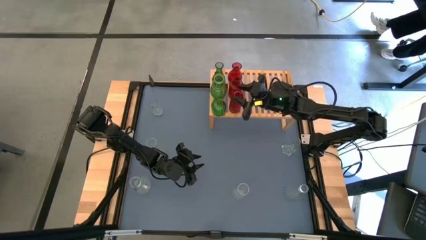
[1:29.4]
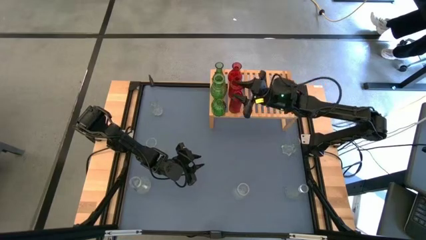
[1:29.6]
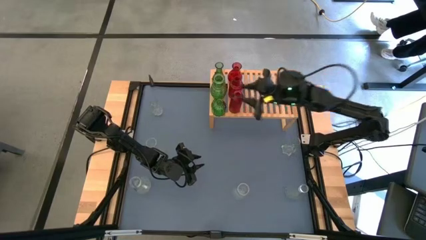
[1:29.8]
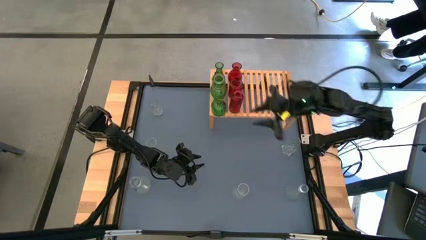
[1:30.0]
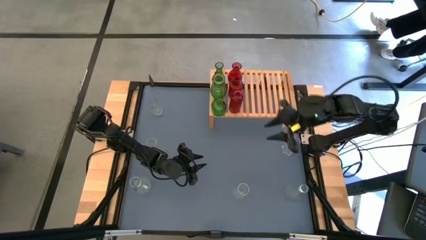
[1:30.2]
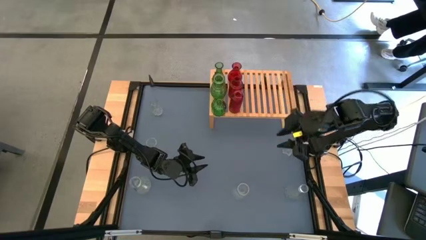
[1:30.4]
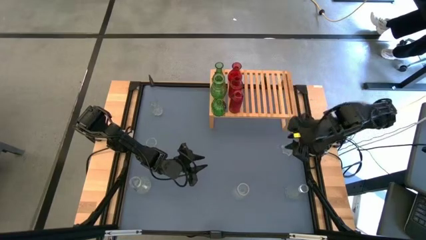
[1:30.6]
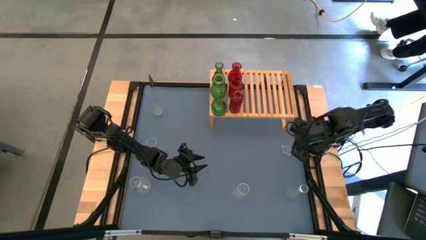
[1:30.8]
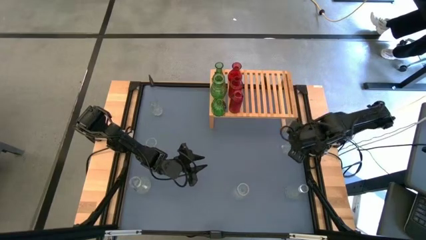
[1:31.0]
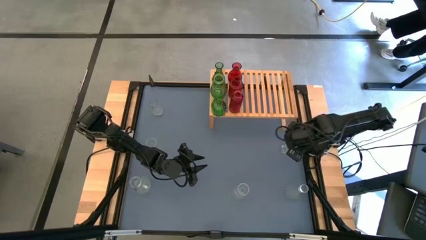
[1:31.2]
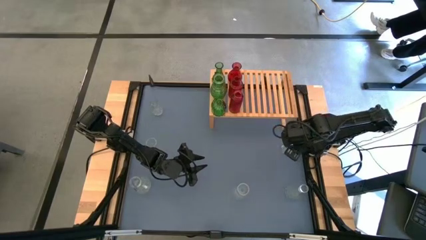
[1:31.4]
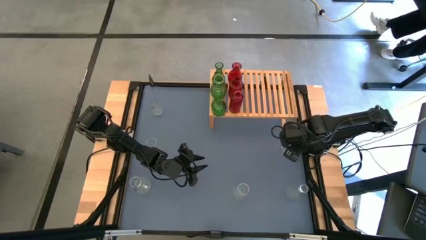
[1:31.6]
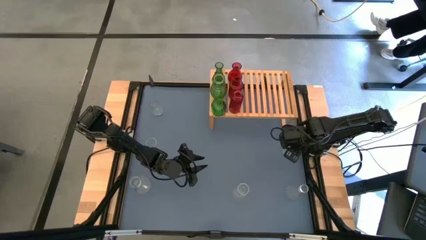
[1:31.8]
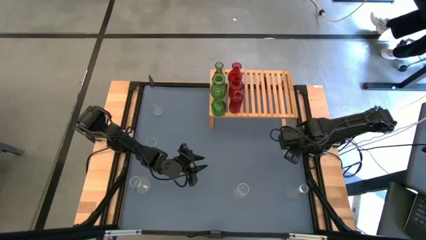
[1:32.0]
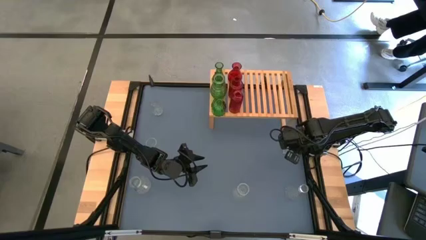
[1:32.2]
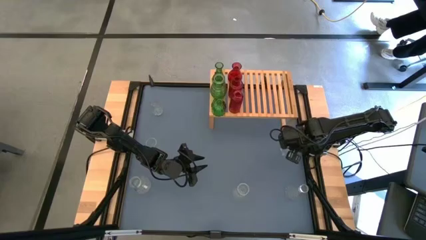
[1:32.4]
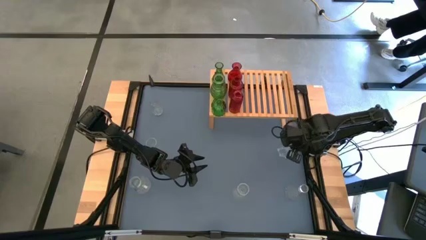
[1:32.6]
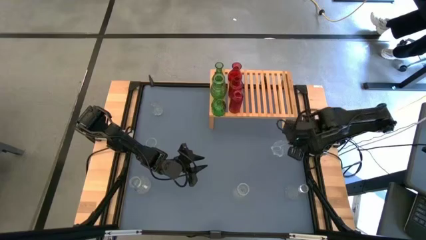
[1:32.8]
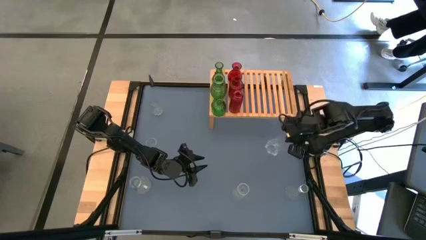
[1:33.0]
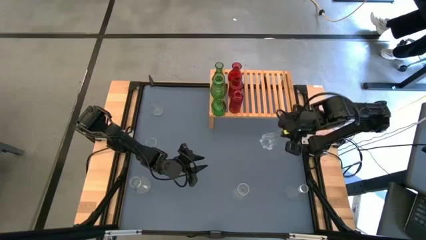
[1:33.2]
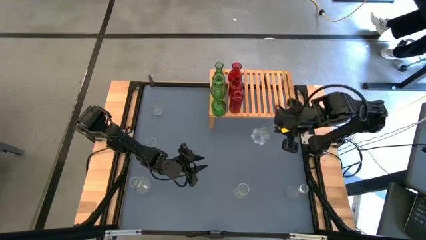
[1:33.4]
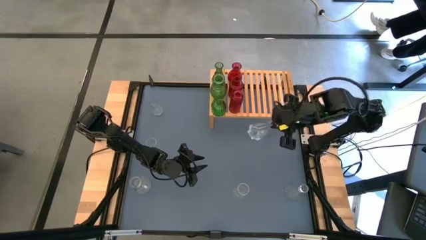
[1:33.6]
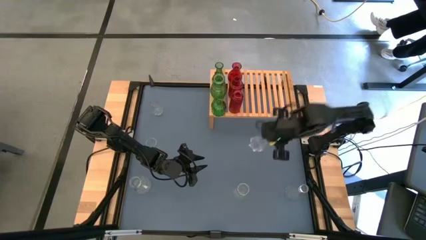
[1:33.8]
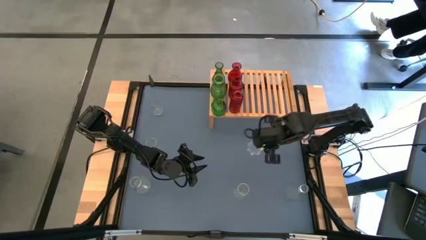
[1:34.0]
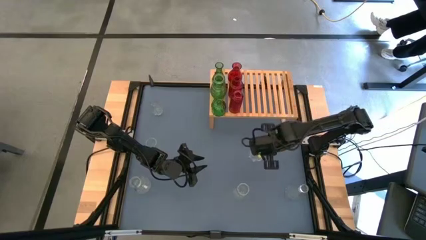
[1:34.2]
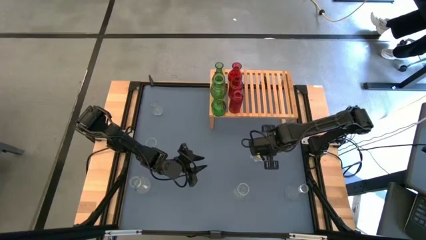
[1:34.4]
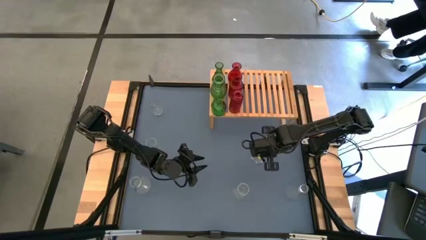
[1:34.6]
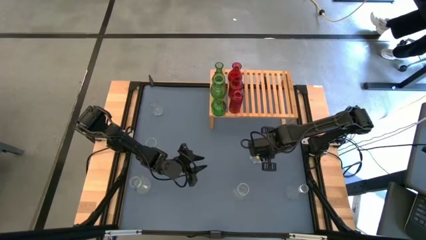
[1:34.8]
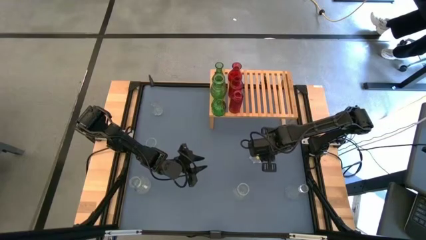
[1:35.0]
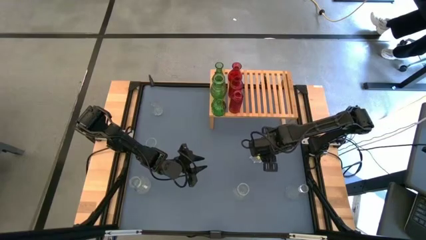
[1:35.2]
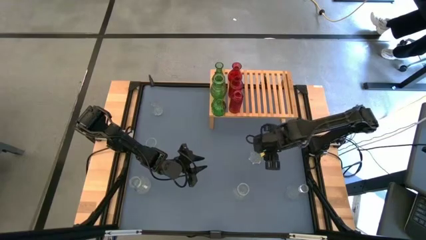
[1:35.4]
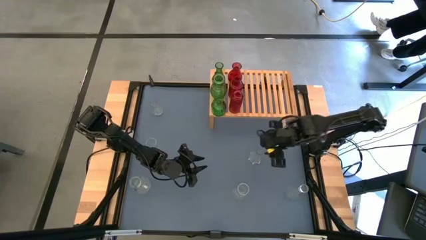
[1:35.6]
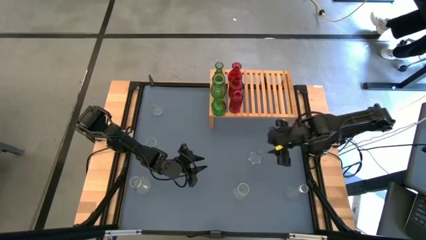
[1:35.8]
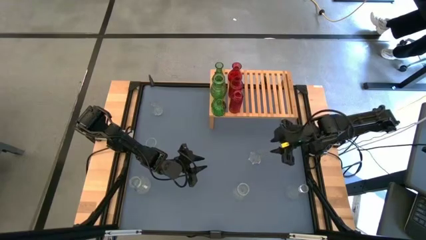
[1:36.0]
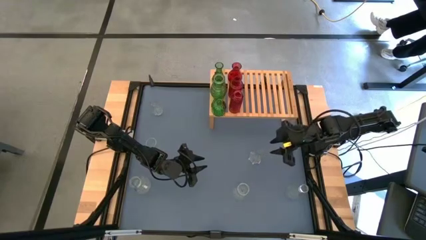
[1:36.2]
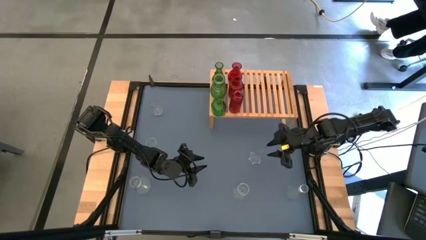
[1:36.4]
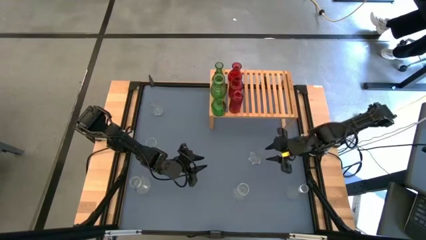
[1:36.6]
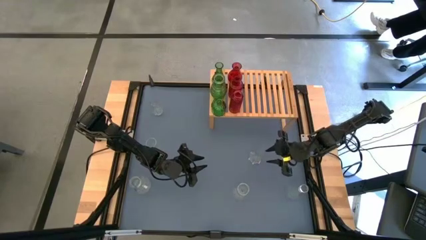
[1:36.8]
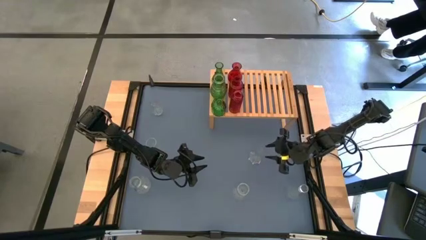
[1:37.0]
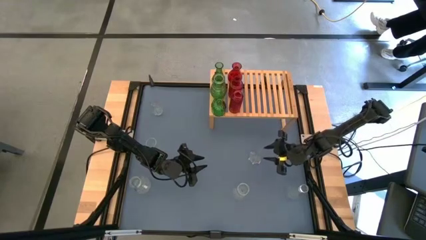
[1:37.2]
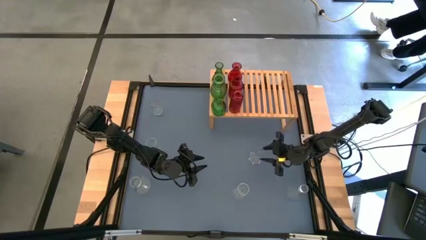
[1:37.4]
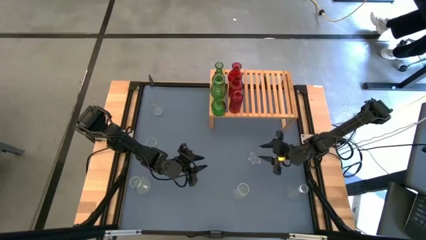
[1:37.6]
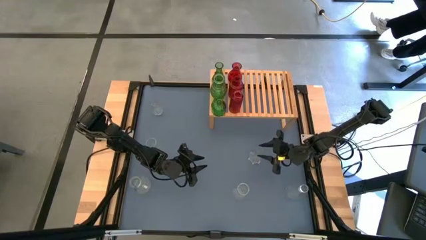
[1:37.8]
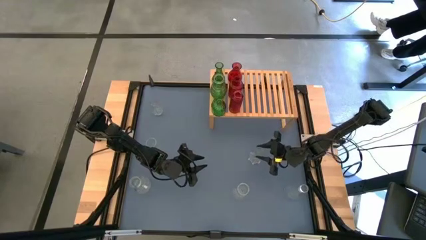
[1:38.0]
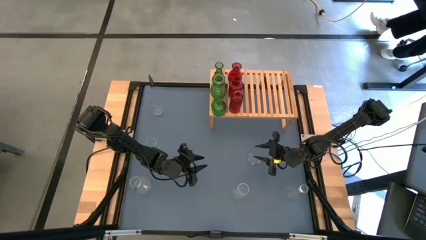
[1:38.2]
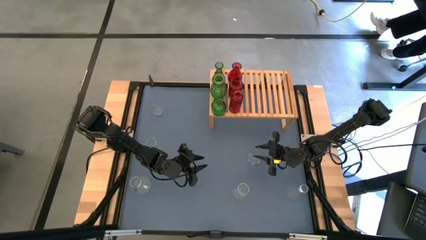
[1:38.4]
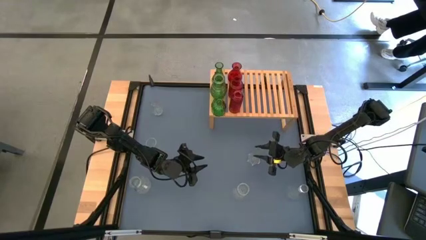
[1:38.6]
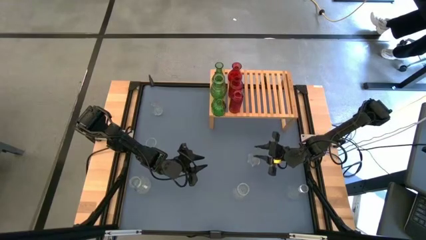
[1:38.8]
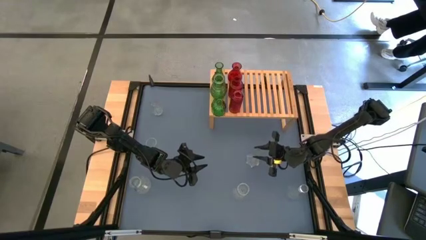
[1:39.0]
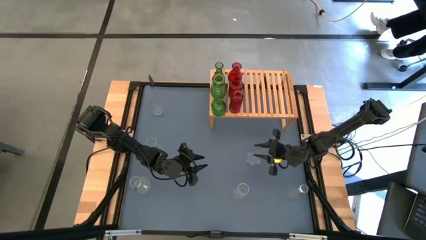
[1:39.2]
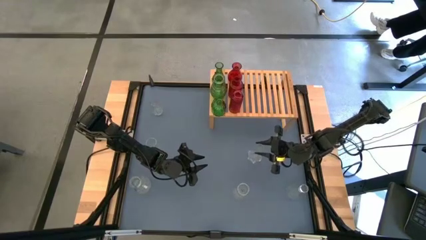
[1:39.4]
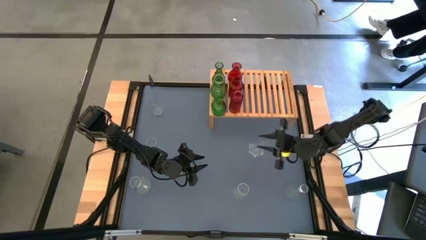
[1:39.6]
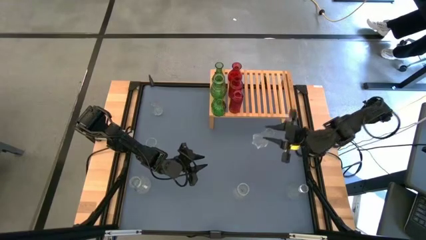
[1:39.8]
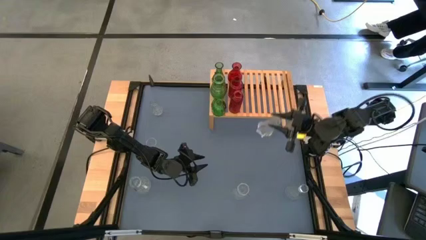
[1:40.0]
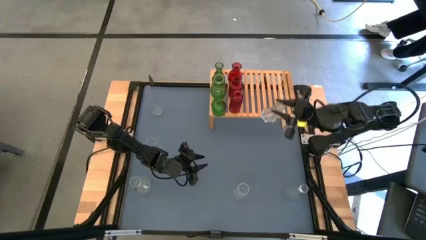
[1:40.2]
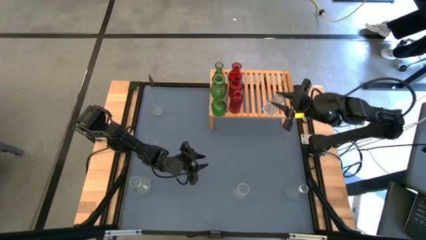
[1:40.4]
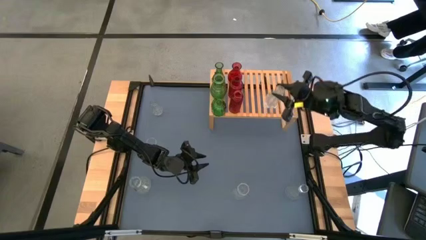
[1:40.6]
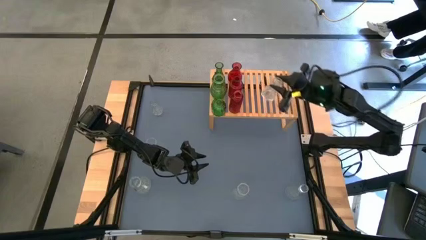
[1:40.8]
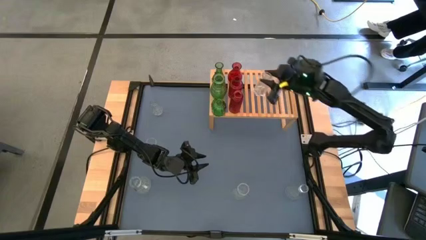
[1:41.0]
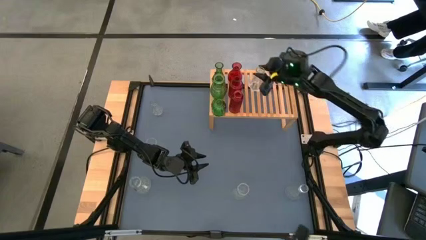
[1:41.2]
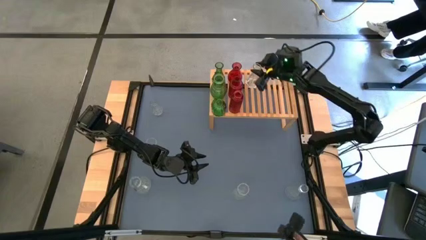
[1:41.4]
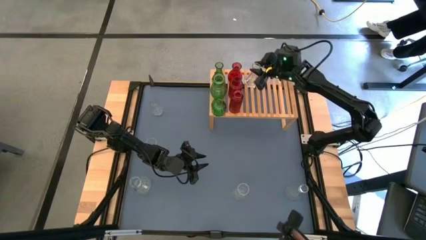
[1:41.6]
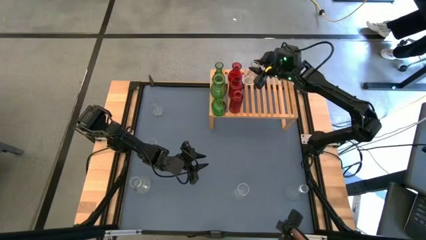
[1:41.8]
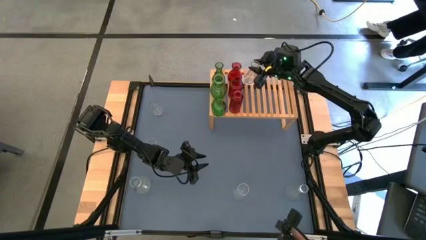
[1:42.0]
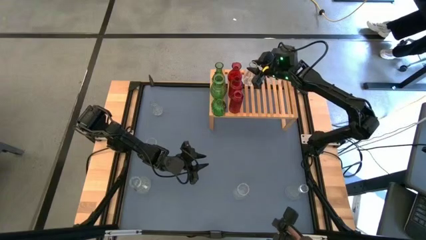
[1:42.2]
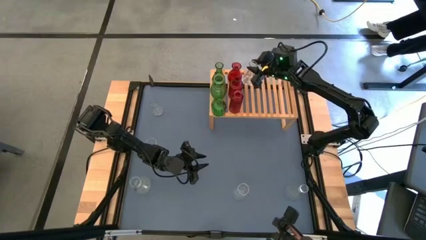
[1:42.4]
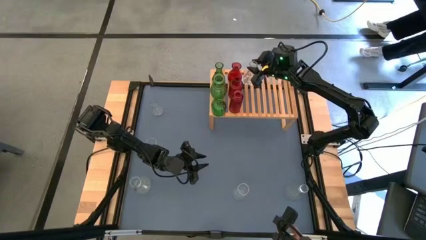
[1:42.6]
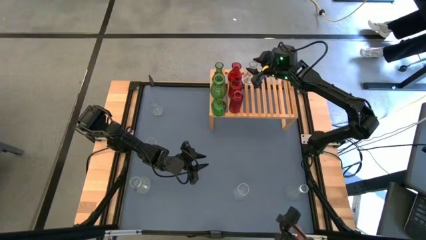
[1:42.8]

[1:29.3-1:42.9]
Task: sort vases onto shelf
Put the middle right transparent vase on the shelf
